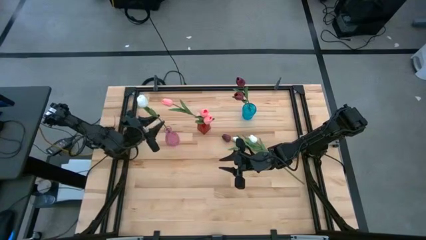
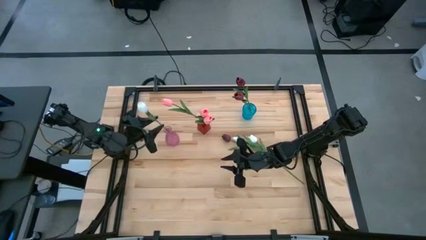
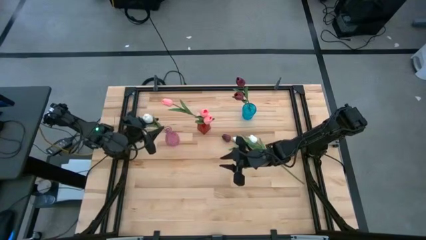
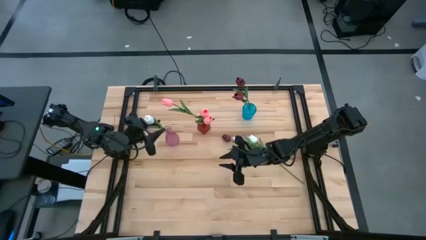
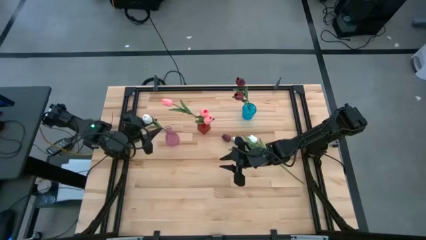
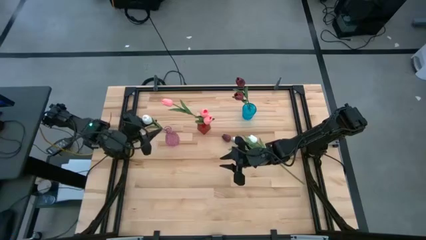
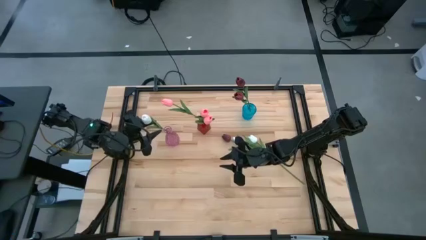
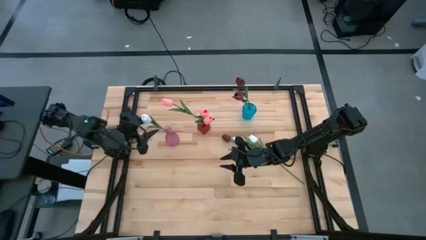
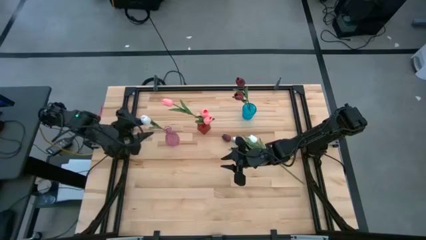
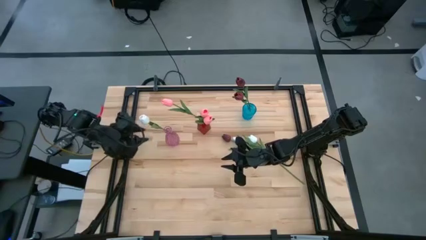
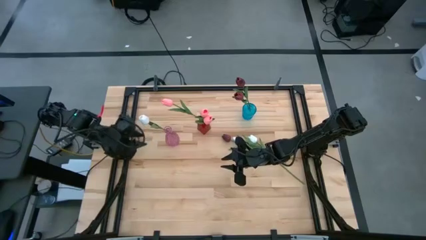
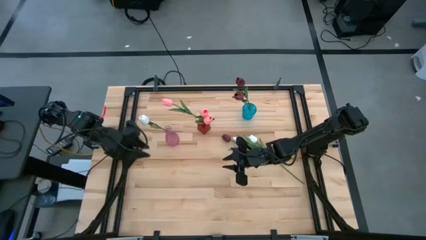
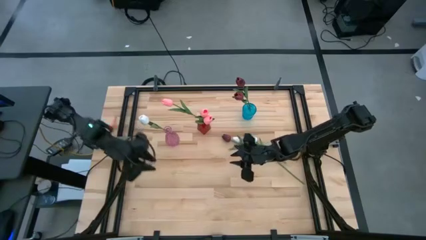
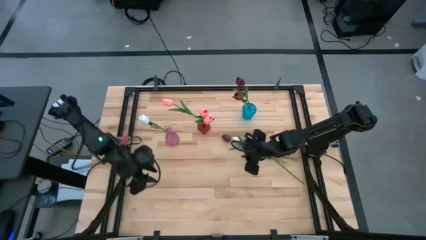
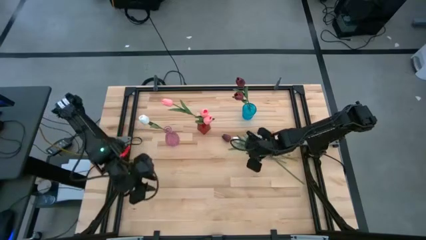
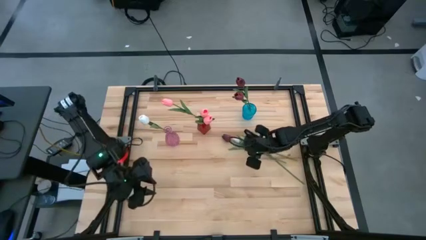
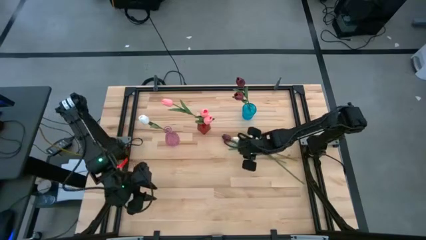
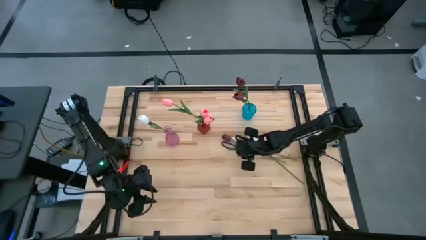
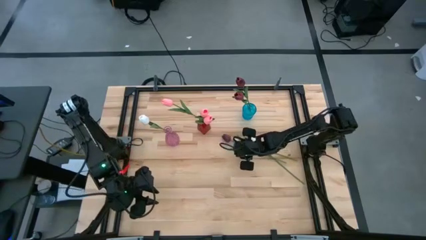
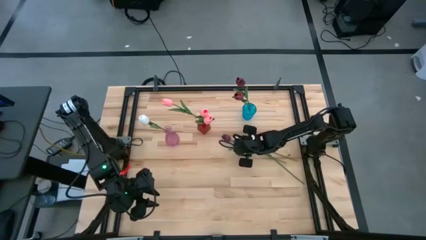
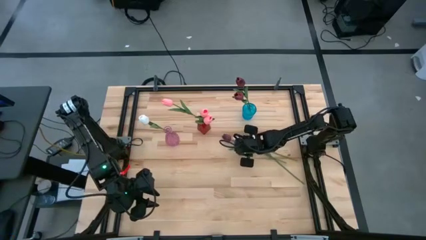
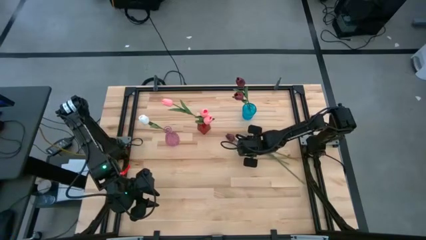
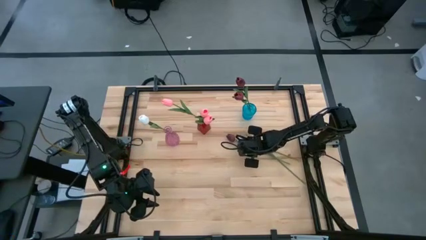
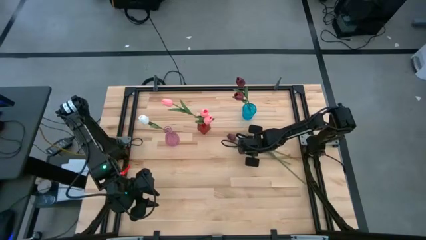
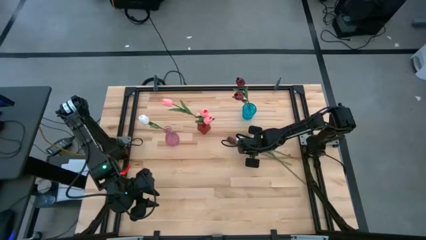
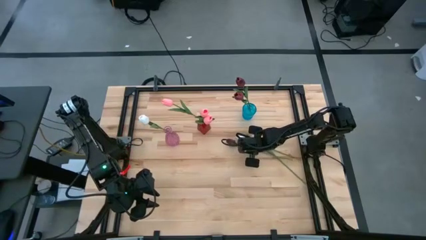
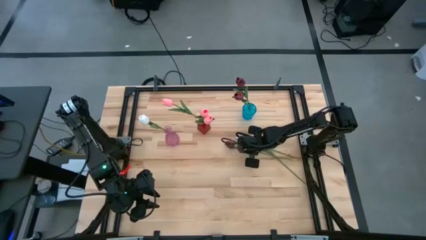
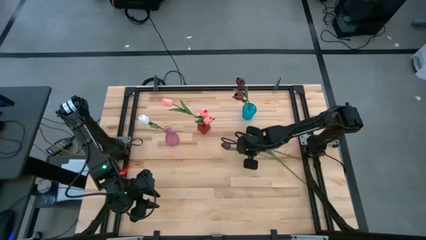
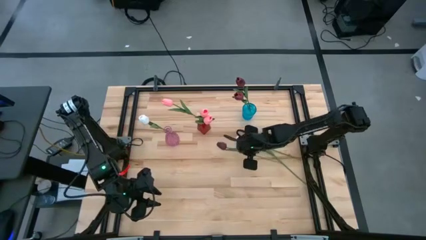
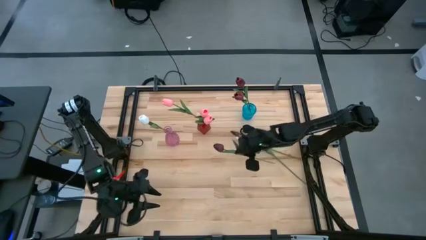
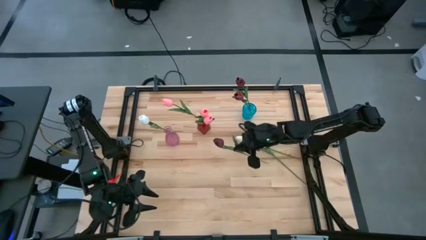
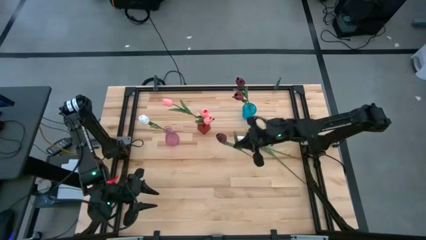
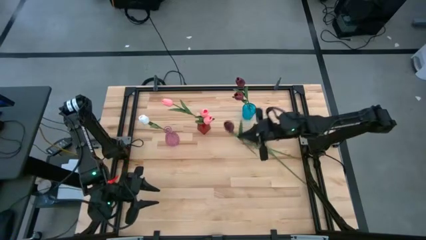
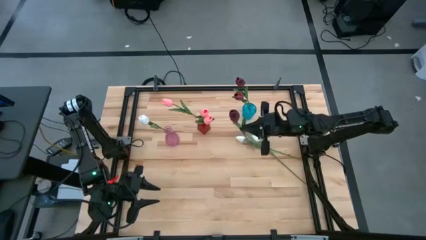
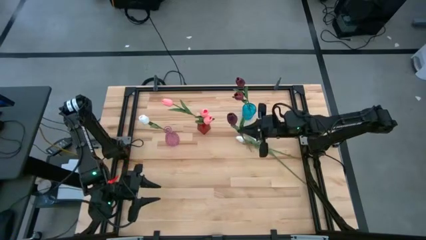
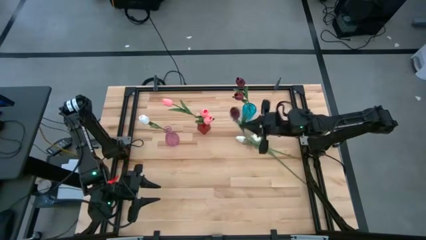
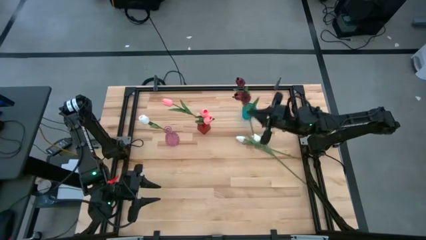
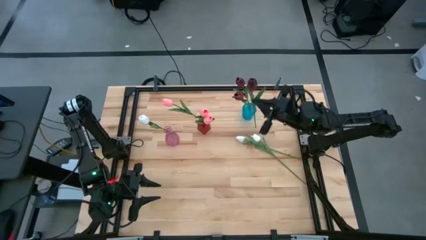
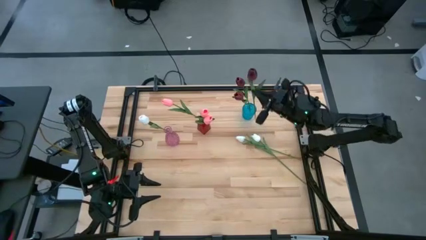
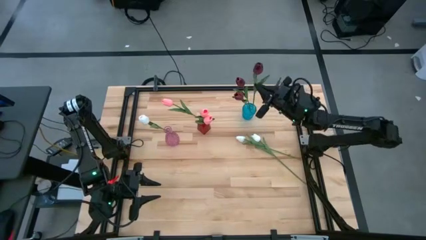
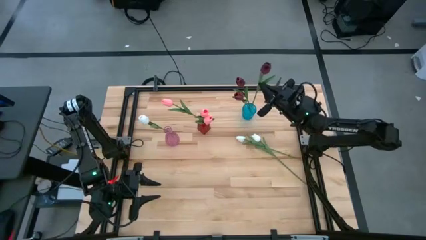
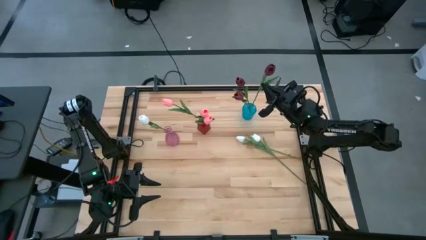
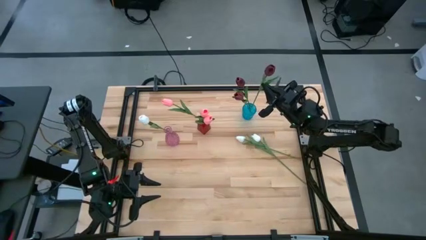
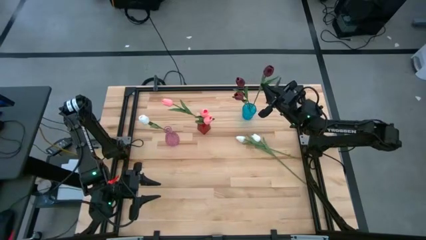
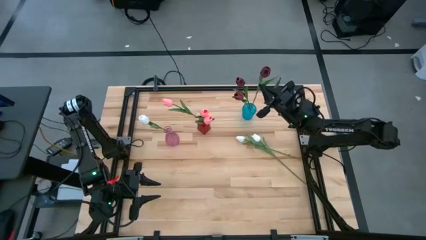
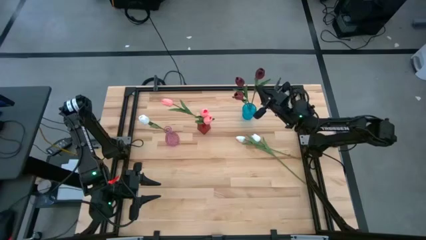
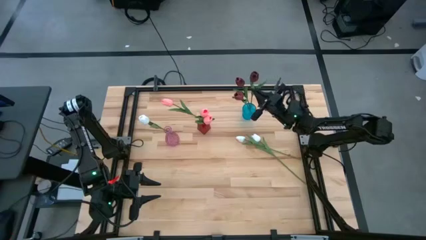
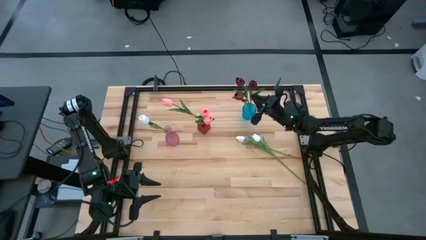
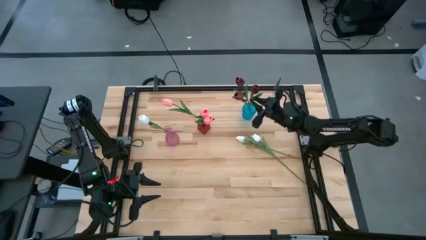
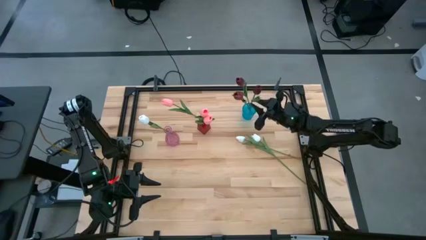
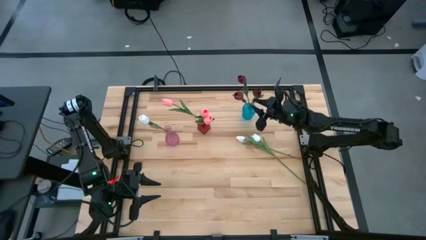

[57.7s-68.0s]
Task: Sort flowers into vase by color
Put the red tulip into the blue vase

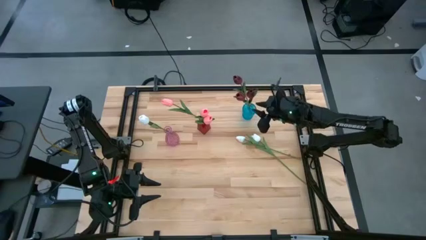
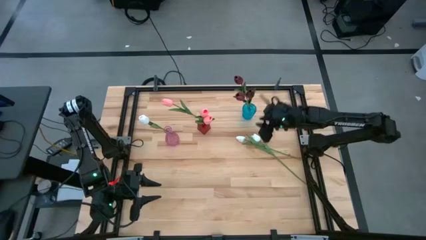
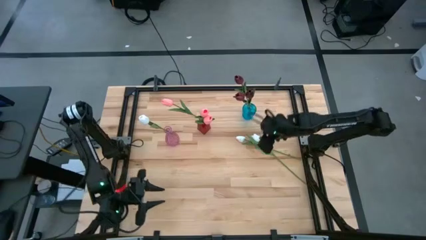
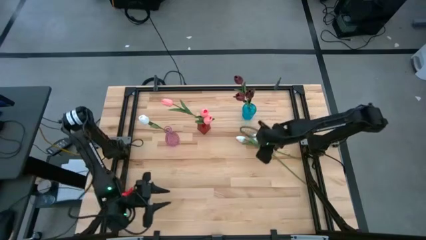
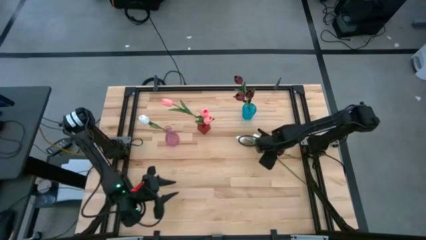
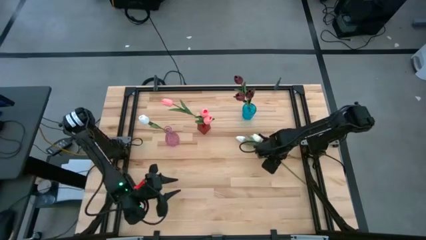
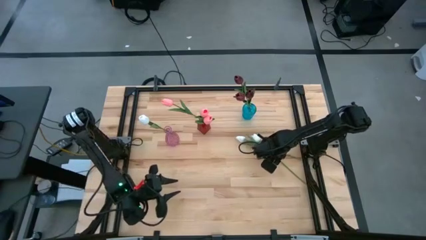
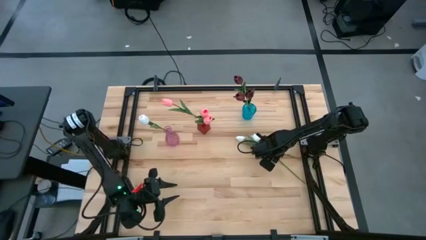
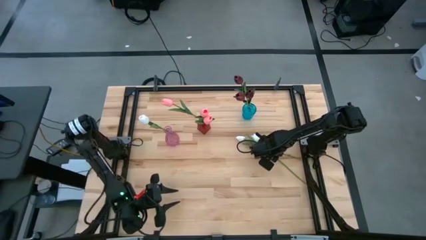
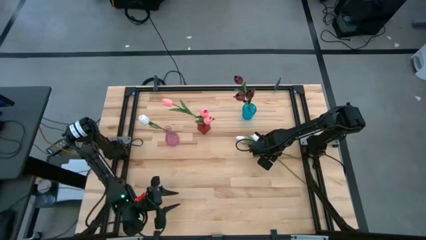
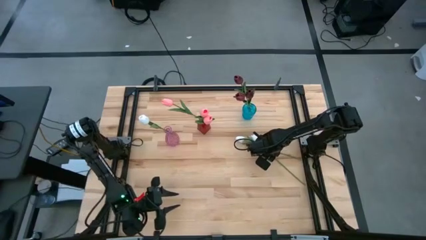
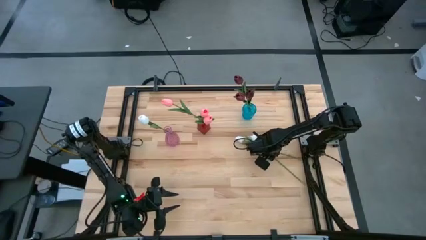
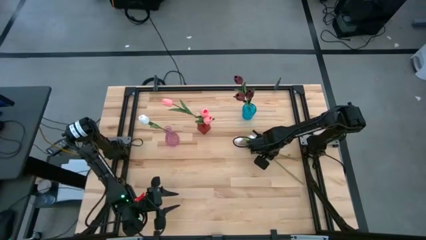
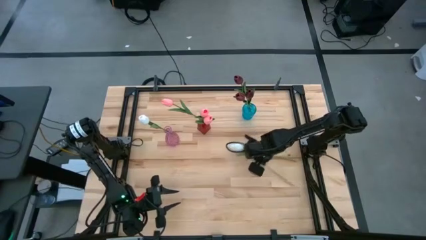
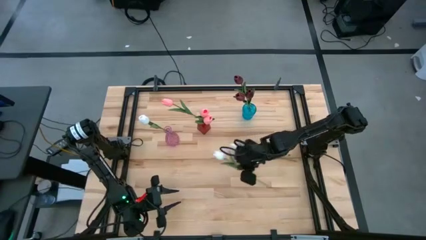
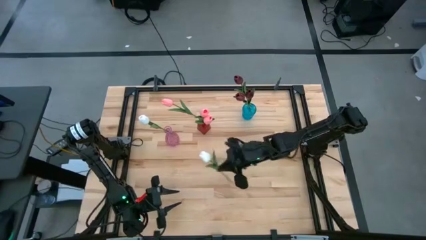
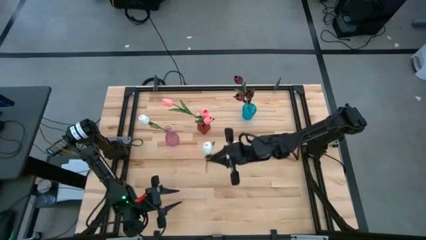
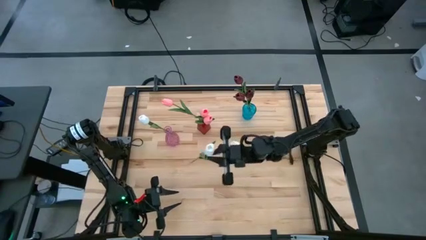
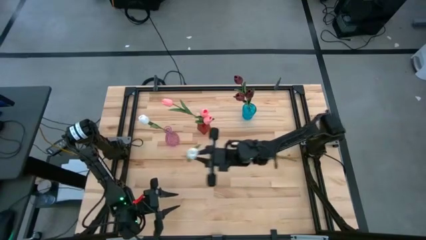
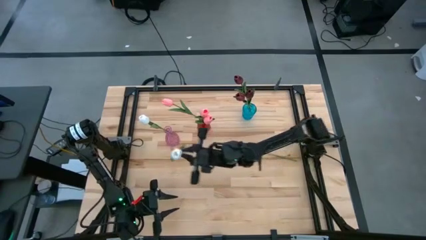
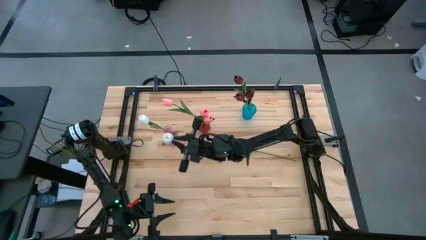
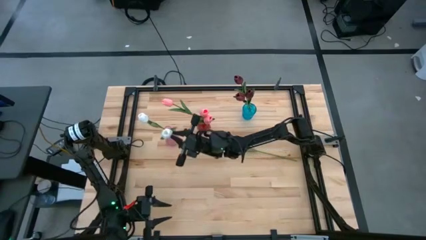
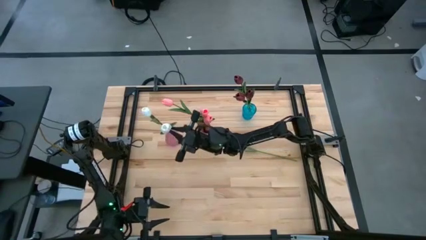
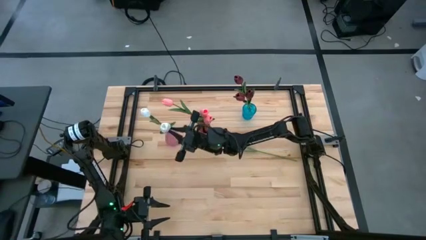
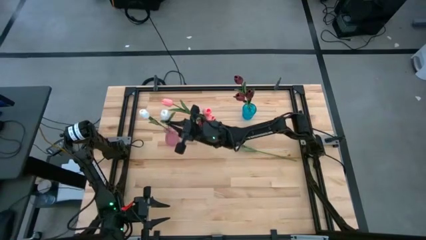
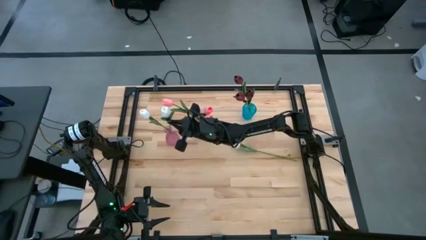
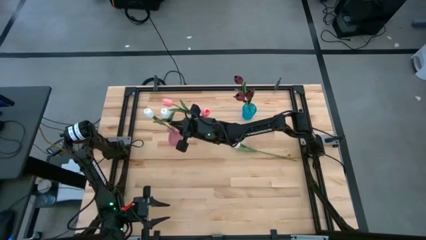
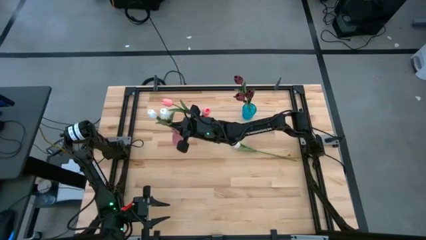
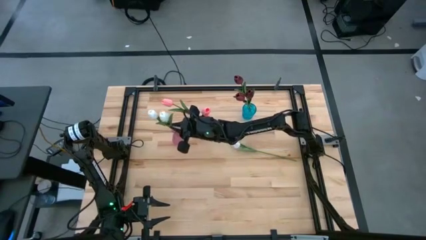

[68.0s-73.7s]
Put the top white tulip into the pink vase

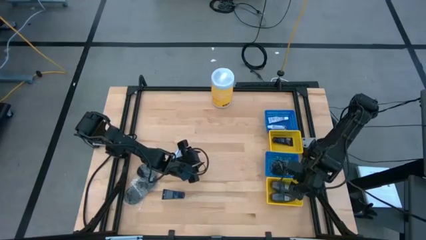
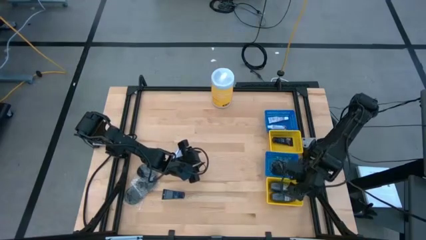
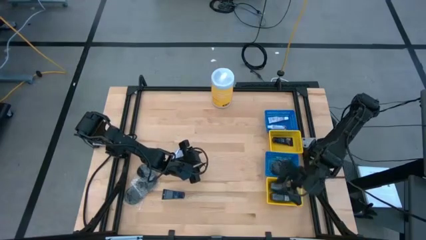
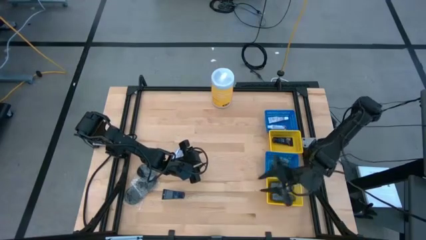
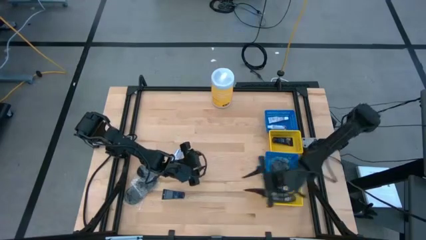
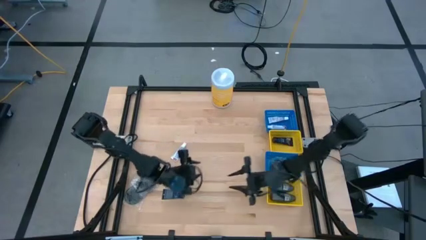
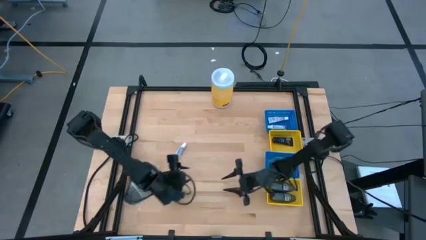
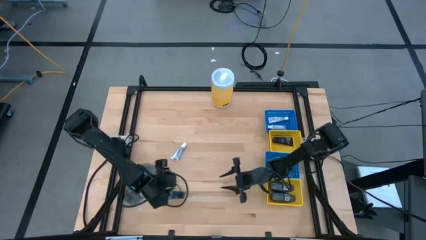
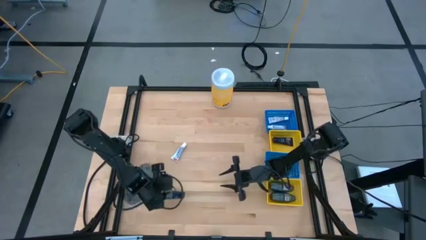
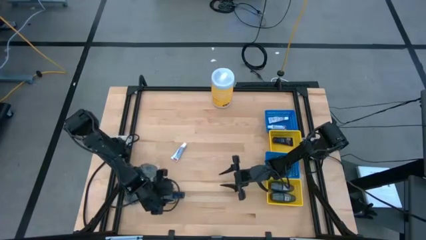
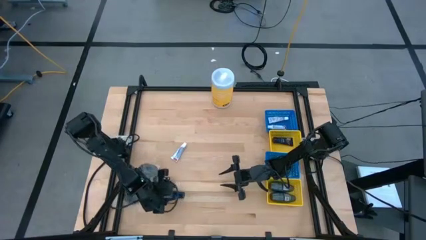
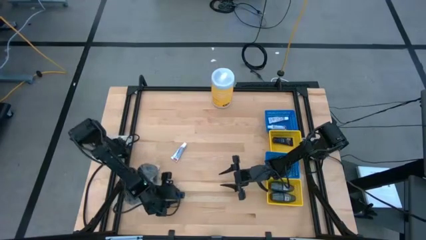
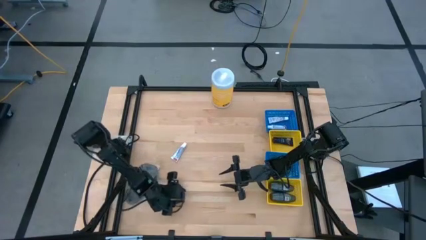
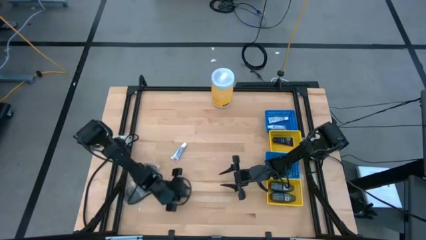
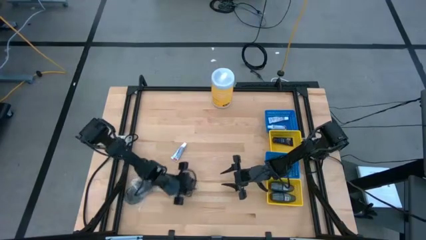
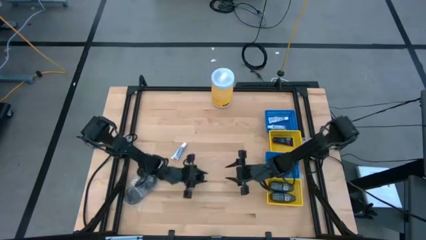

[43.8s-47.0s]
Task: Pick & Place Travel size toiletries
Put the blue shave cream into the top yellow bin
